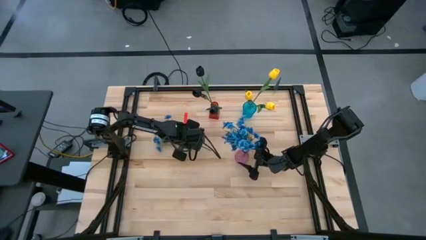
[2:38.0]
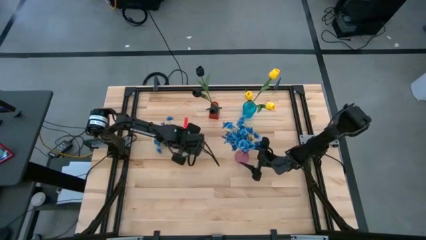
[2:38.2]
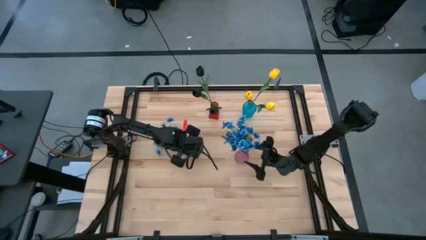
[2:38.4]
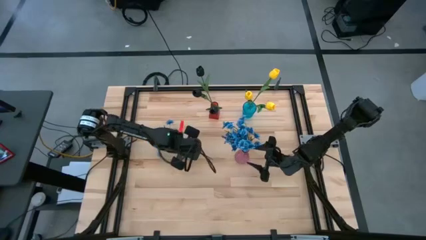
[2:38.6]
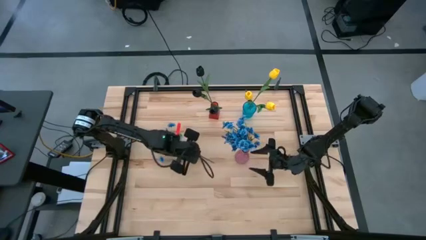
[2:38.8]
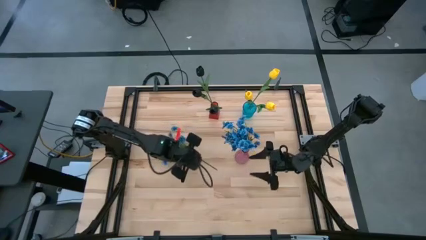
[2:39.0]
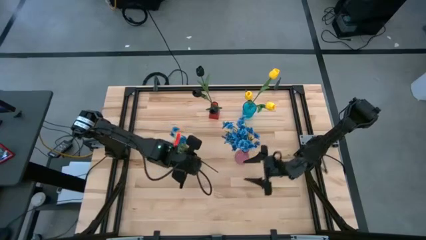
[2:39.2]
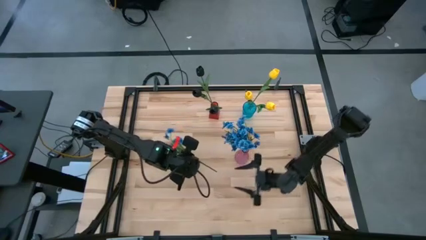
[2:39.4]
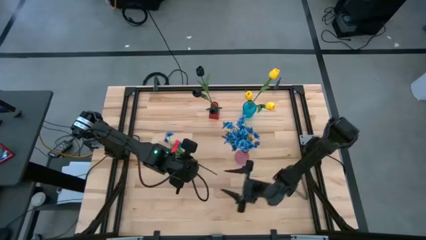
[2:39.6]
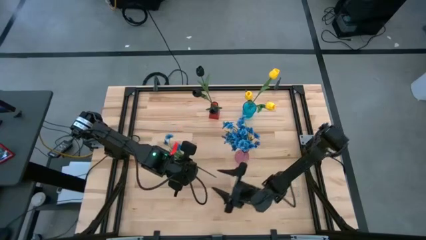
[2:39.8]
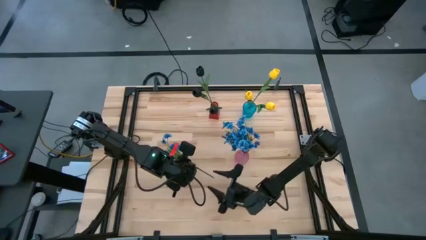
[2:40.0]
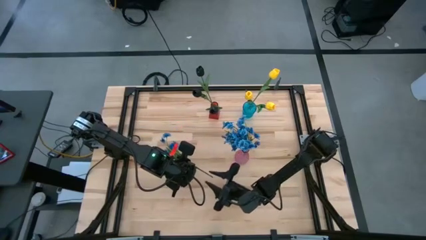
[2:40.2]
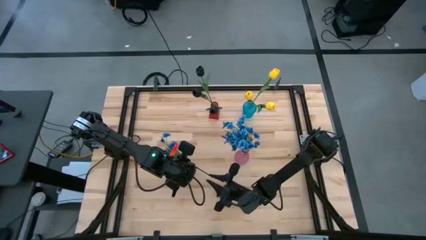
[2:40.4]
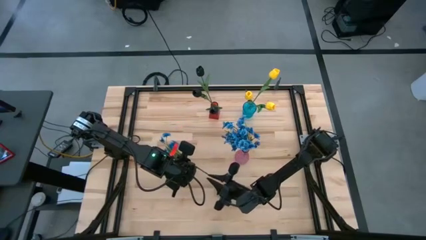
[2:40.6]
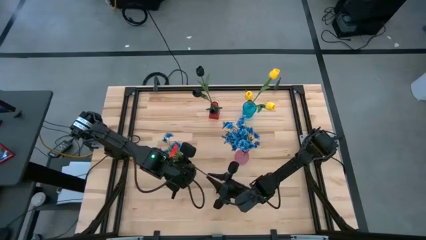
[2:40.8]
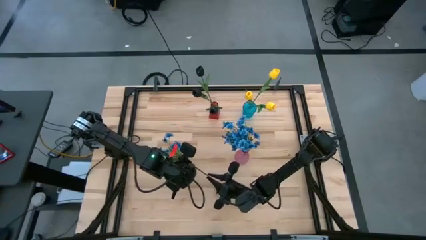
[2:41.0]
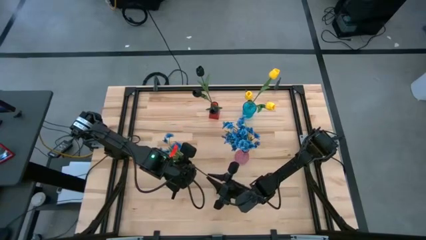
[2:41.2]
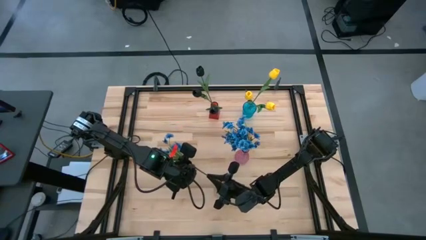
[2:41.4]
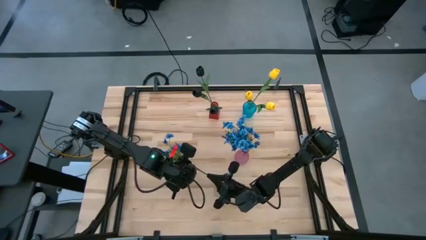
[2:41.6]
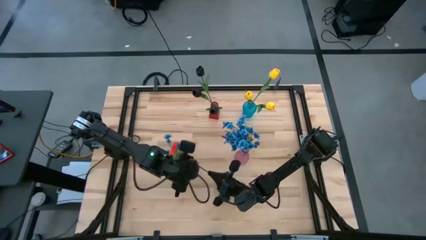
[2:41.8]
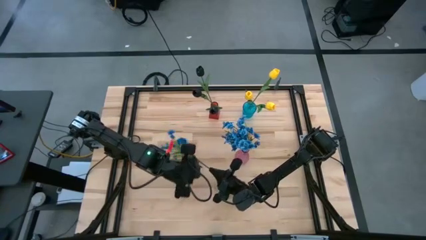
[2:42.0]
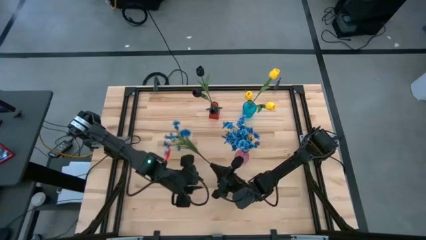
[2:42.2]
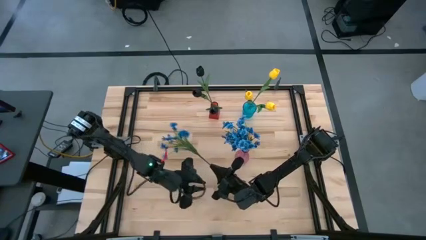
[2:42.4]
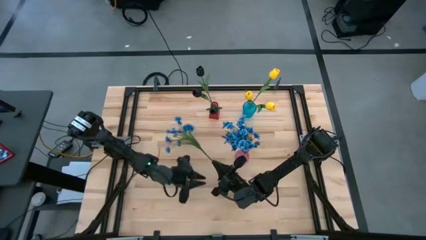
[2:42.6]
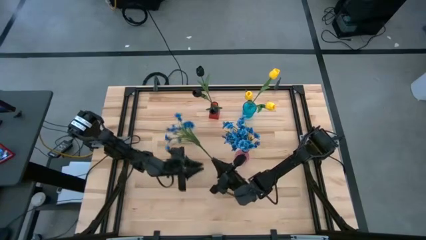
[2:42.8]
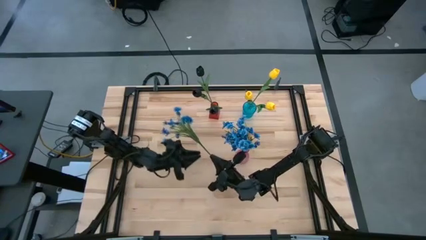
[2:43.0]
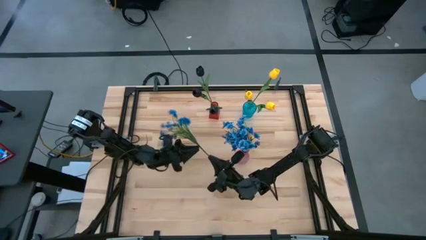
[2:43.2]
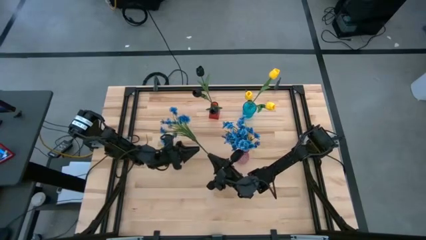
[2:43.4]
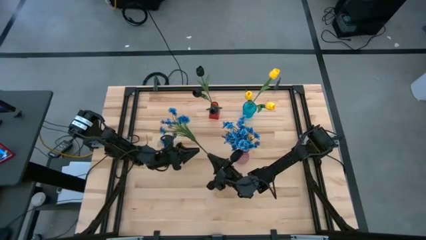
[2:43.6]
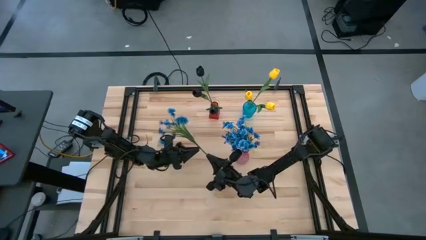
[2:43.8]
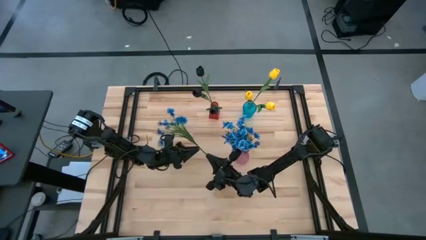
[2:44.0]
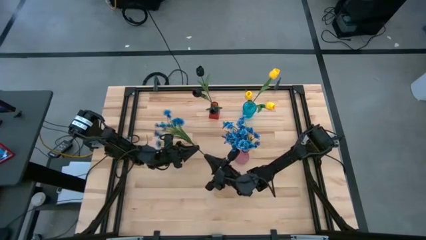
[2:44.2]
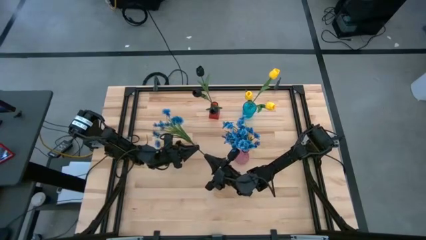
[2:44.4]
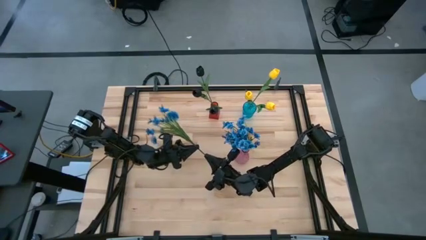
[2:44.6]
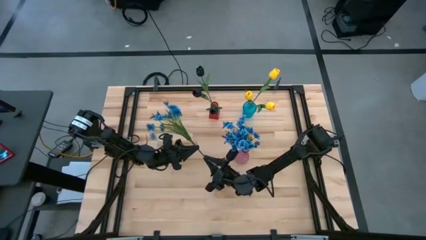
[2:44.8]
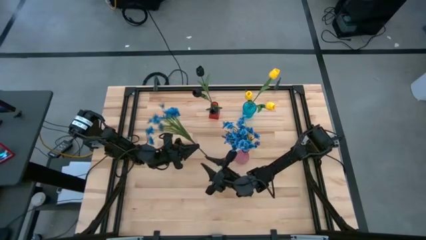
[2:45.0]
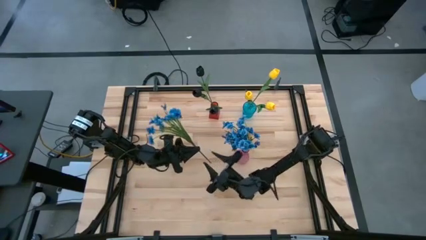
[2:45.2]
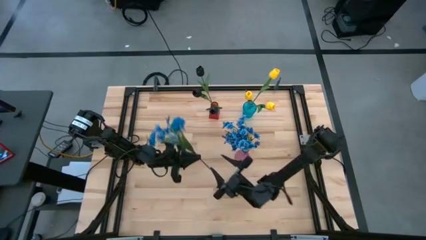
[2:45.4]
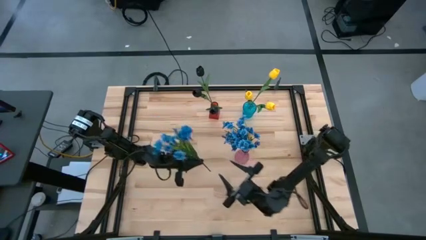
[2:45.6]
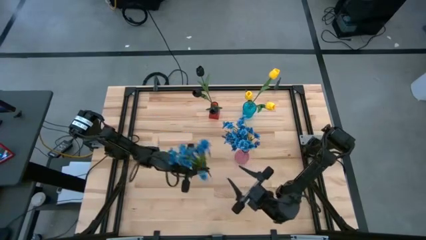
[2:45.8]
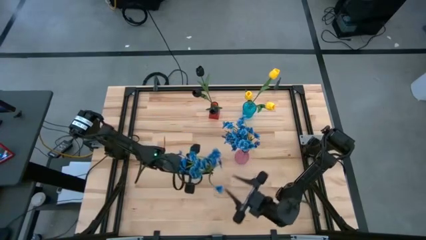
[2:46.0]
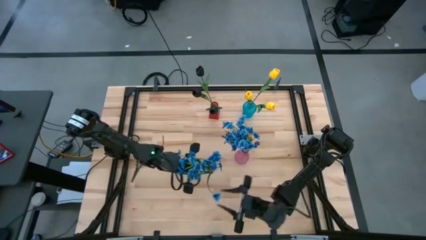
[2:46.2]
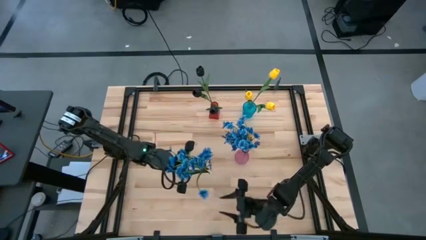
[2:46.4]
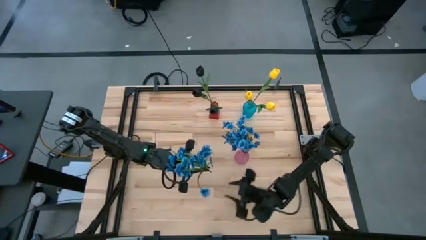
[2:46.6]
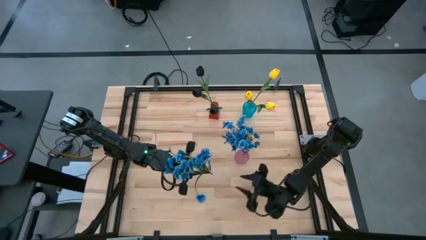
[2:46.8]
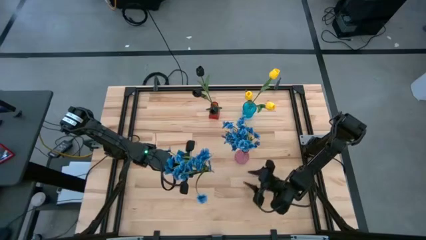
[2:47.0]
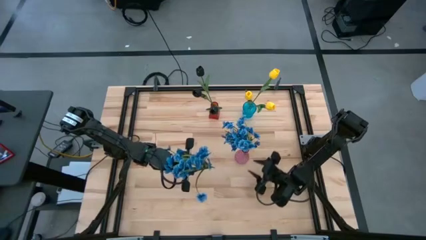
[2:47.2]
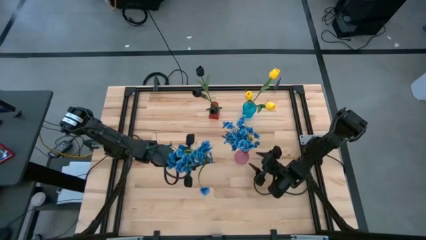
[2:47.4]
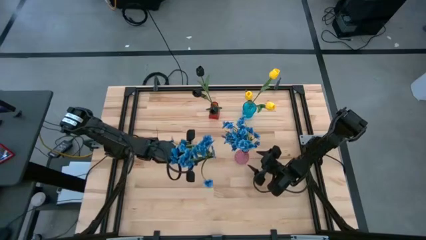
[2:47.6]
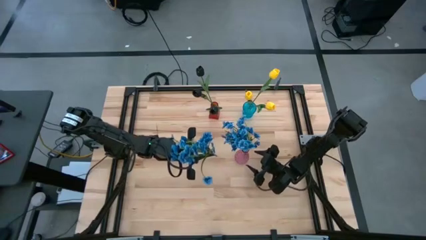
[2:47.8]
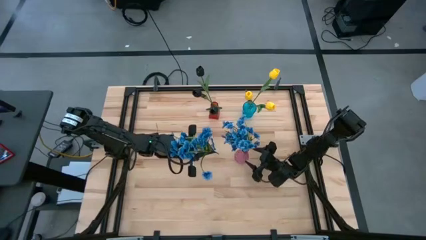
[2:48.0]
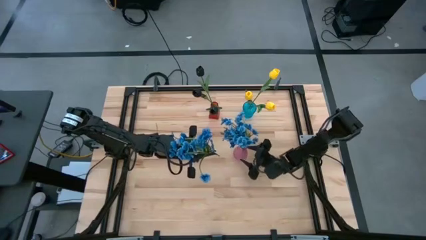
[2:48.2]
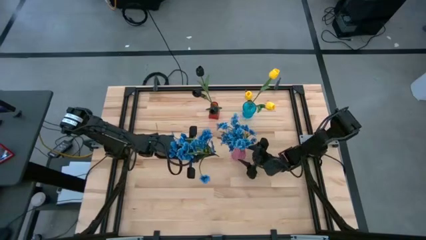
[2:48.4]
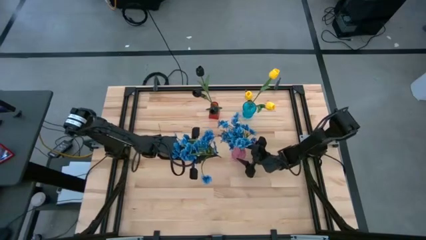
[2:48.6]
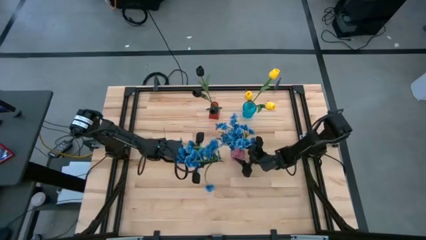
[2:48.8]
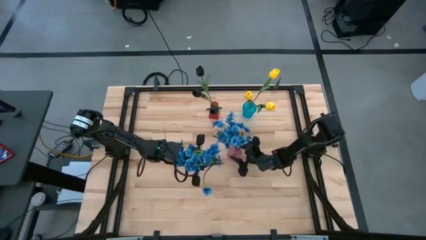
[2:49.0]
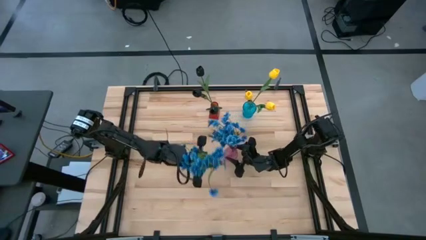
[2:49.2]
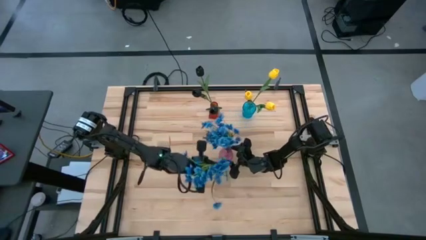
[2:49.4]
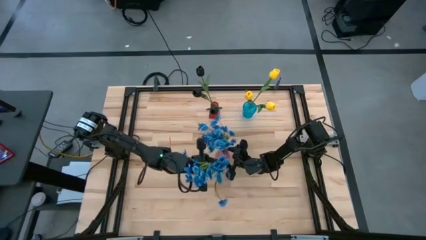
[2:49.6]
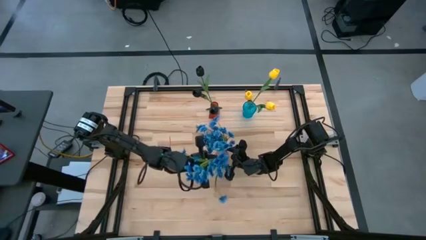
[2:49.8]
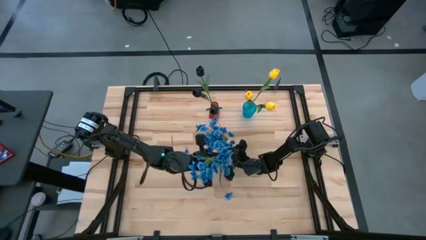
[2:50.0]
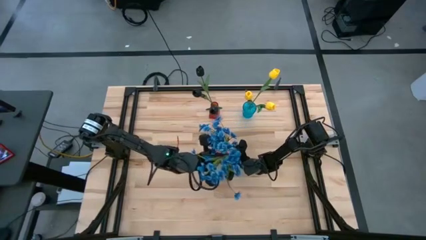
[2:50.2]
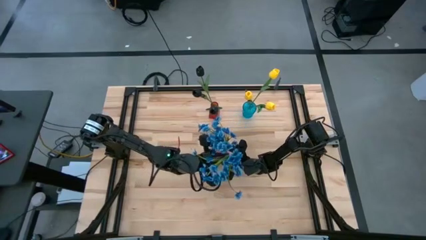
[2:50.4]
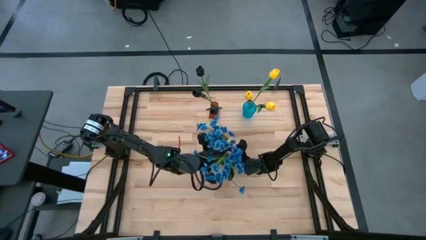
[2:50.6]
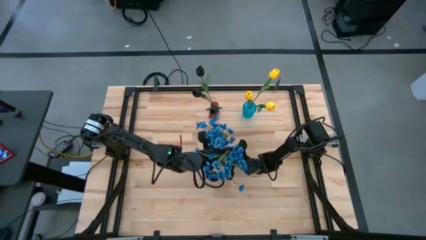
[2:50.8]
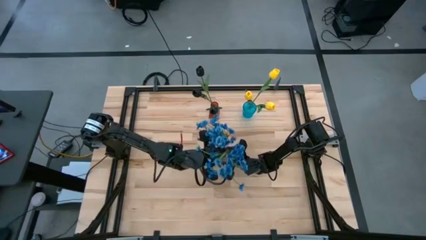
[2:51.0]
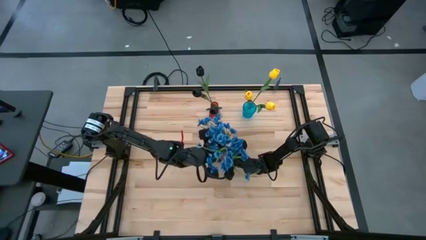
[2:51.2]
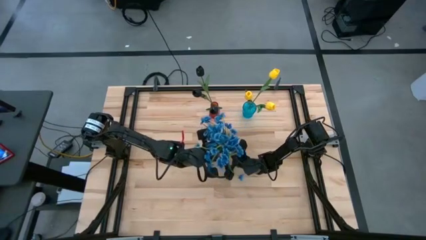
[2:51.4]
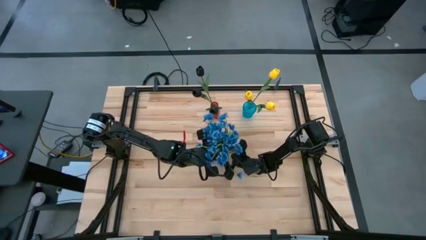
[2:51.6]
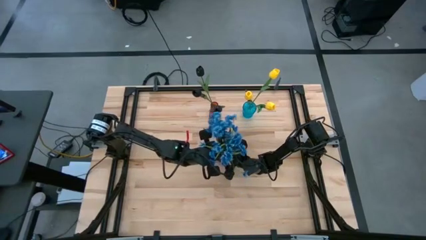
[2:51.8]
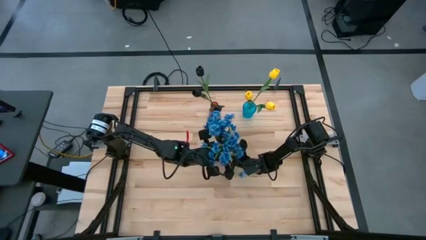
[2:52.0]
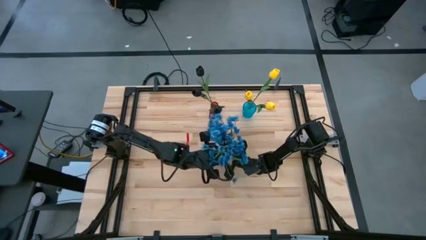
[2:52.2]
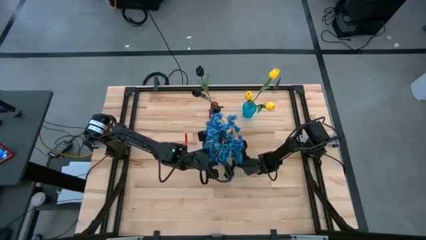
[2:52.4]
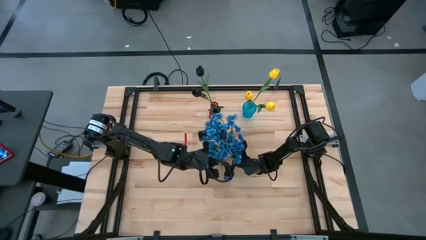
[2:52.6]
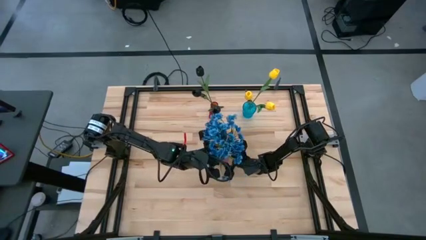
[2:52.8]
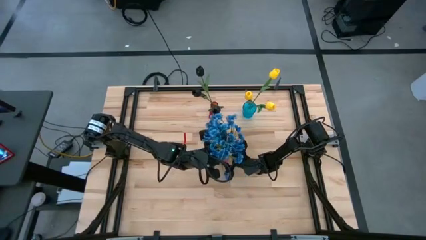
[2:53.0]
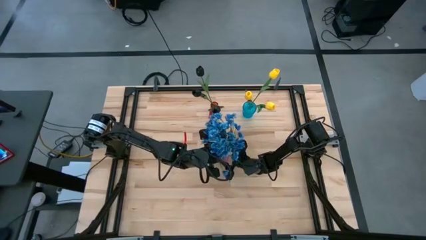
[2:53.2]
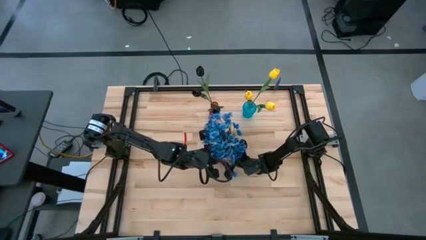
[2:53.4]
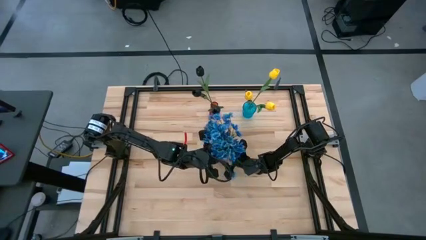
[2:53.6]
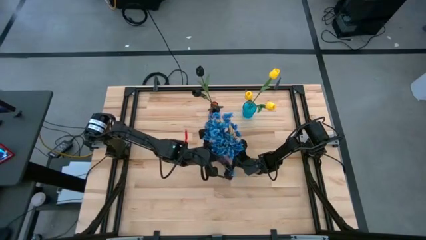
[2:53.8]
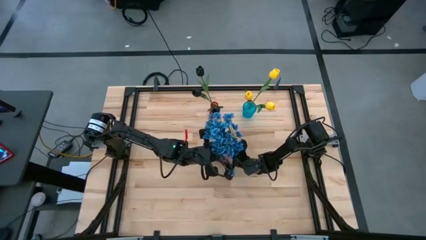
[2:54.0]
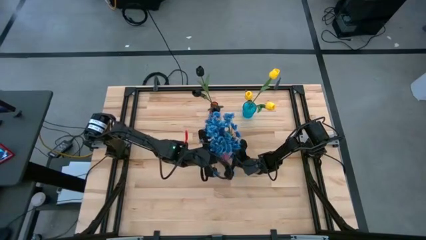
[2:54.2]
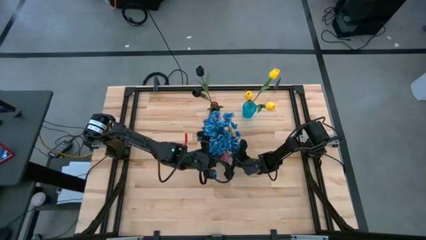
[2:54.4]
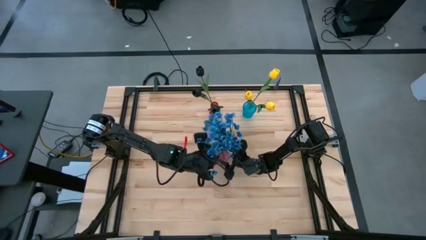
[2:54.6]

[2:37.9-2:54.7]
Task: Sort flowers into vase by color
Put the blue flowers into the pink vase
